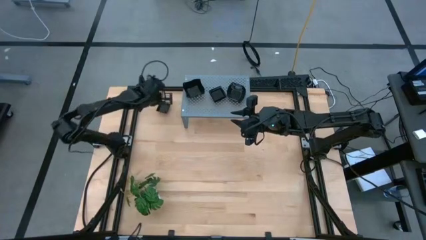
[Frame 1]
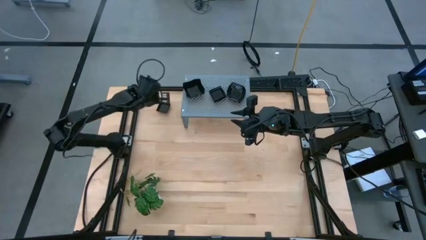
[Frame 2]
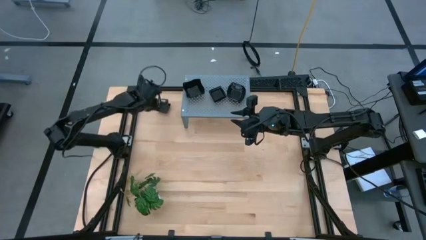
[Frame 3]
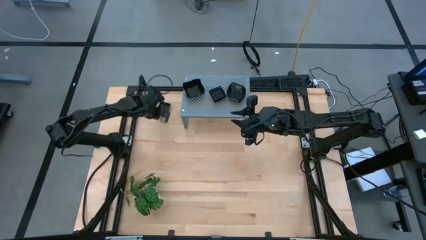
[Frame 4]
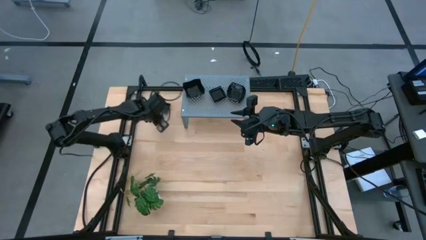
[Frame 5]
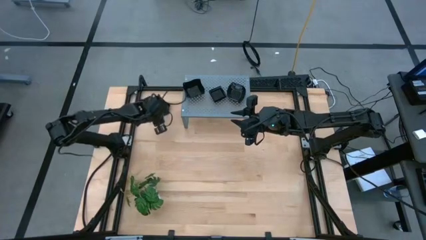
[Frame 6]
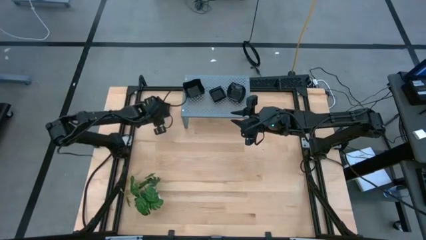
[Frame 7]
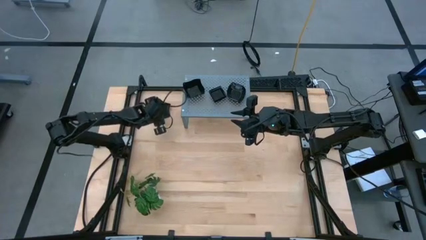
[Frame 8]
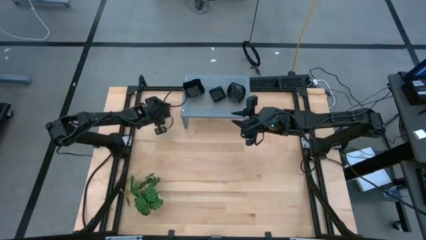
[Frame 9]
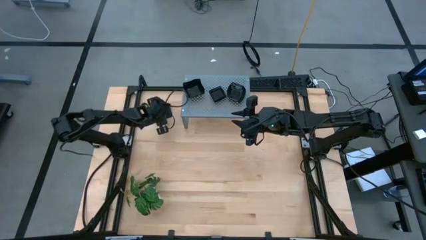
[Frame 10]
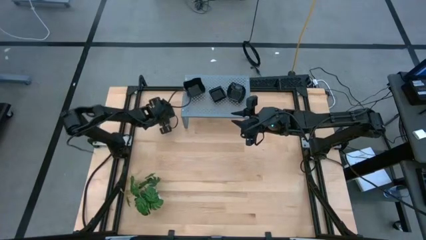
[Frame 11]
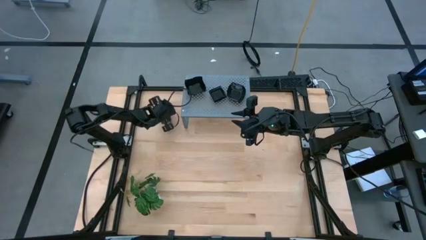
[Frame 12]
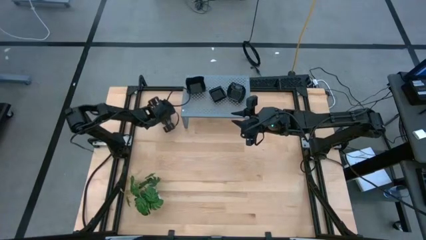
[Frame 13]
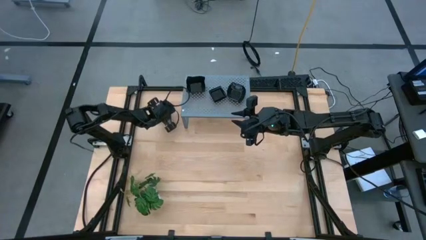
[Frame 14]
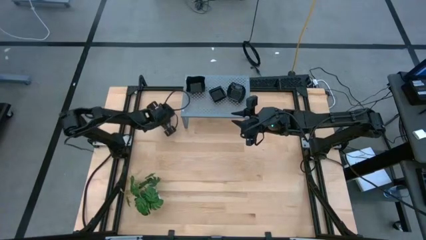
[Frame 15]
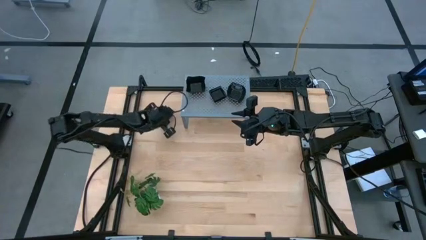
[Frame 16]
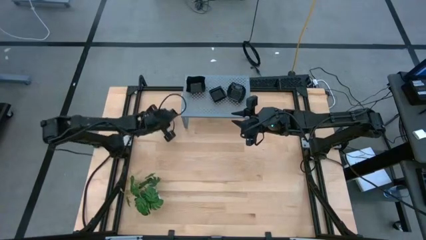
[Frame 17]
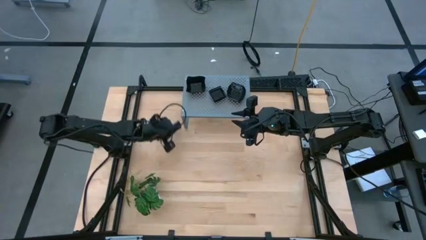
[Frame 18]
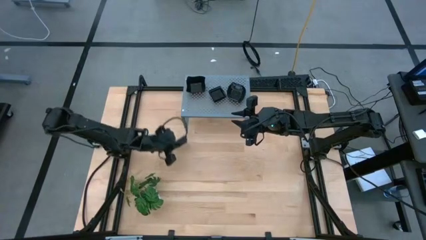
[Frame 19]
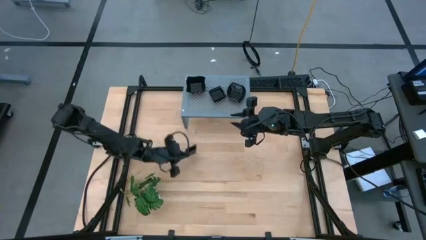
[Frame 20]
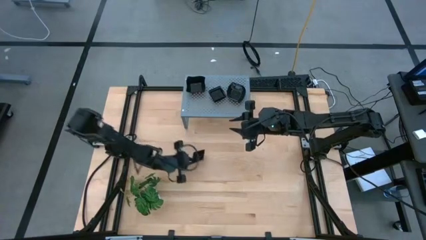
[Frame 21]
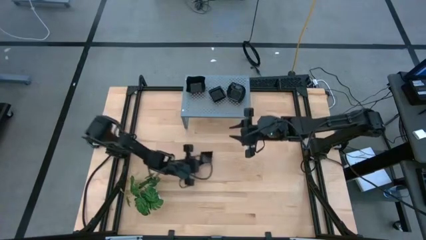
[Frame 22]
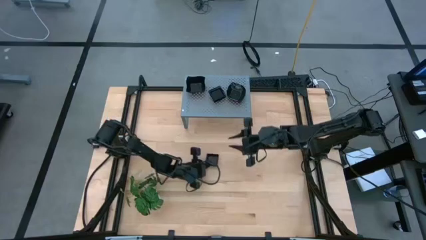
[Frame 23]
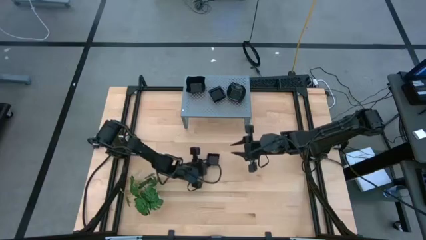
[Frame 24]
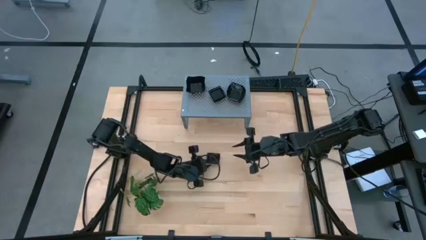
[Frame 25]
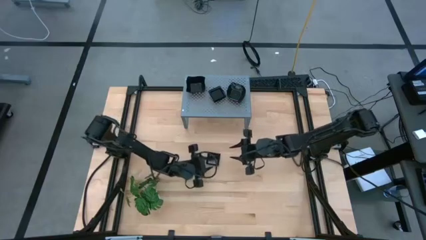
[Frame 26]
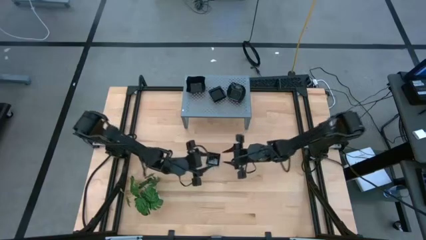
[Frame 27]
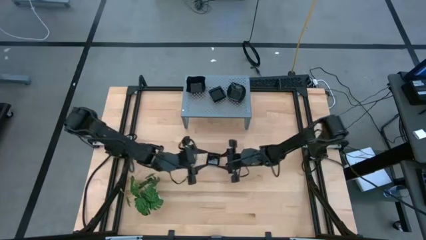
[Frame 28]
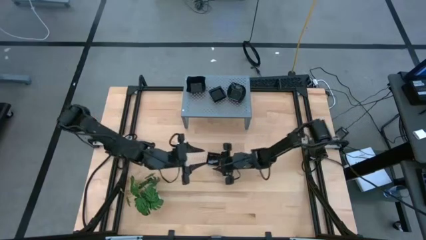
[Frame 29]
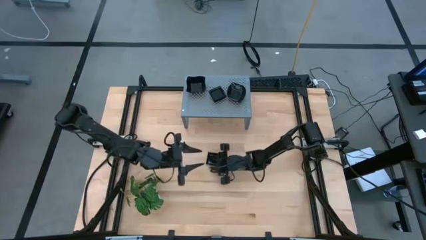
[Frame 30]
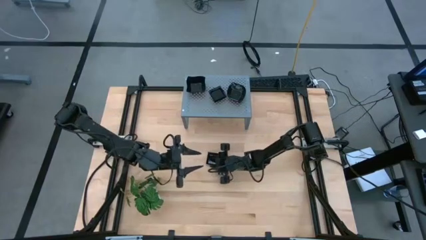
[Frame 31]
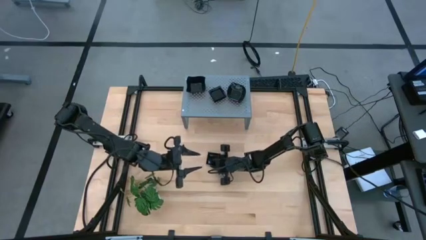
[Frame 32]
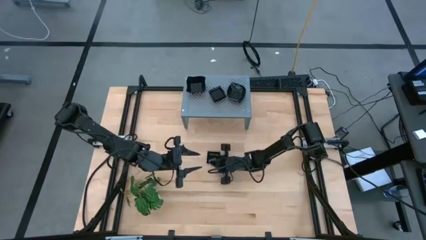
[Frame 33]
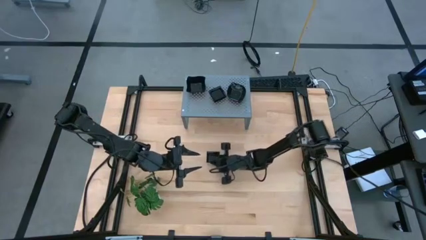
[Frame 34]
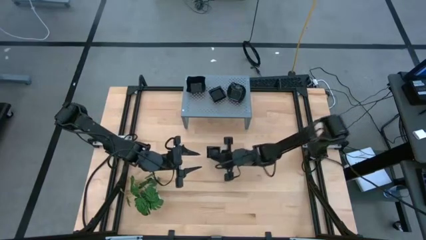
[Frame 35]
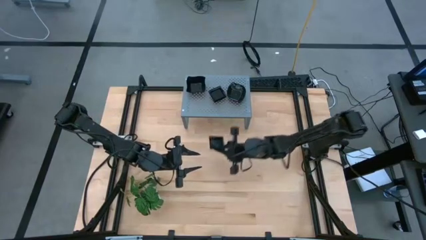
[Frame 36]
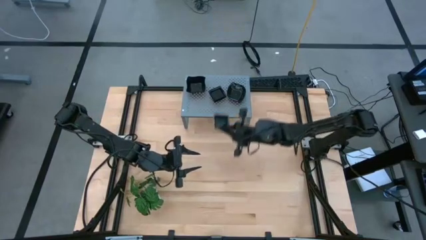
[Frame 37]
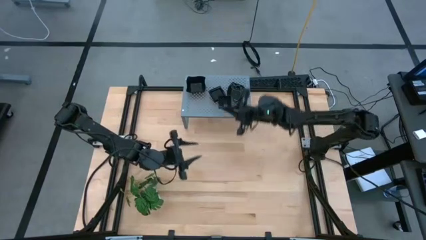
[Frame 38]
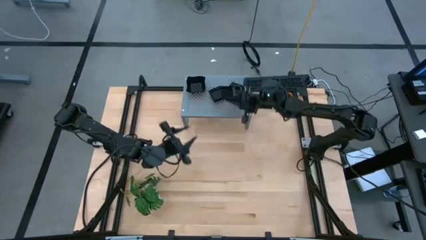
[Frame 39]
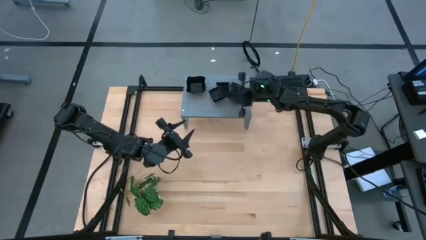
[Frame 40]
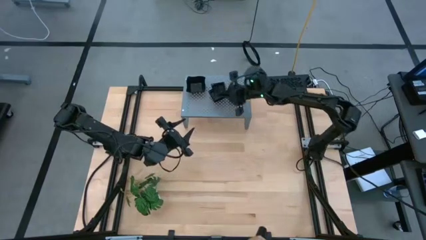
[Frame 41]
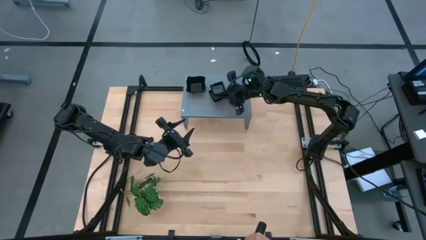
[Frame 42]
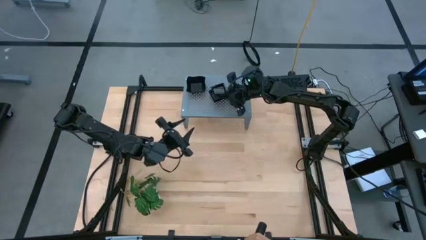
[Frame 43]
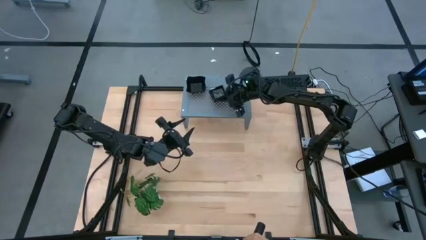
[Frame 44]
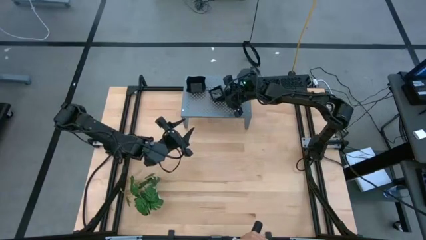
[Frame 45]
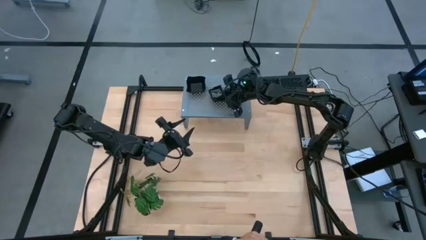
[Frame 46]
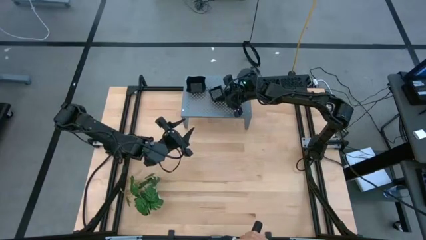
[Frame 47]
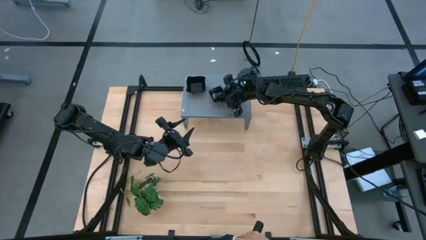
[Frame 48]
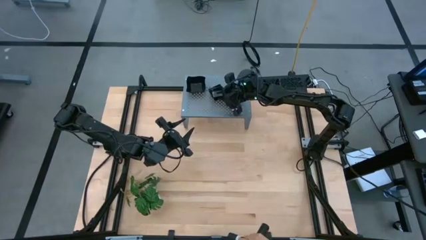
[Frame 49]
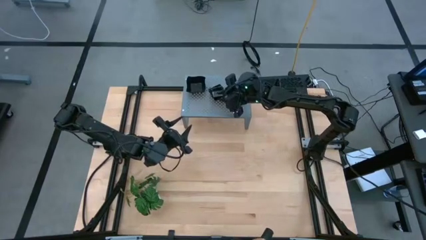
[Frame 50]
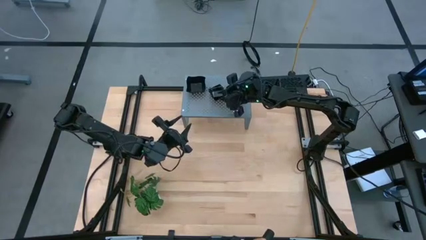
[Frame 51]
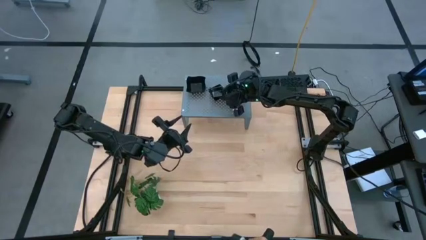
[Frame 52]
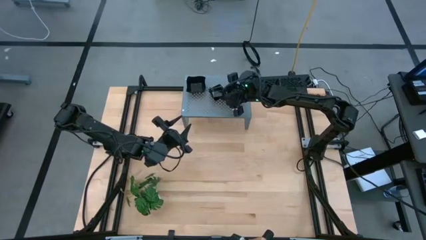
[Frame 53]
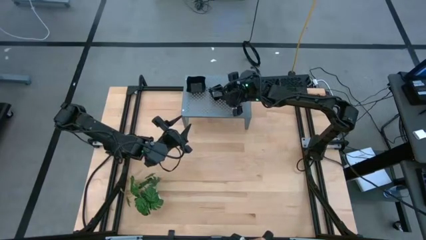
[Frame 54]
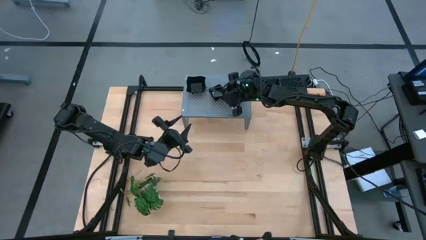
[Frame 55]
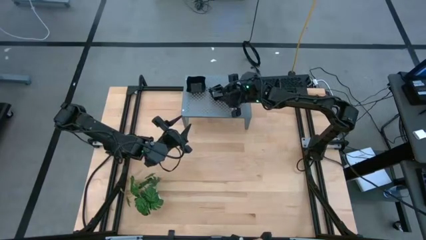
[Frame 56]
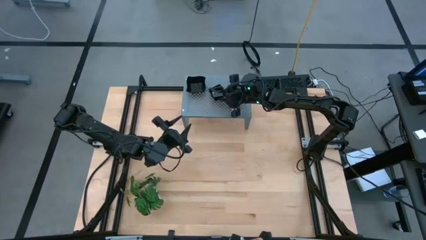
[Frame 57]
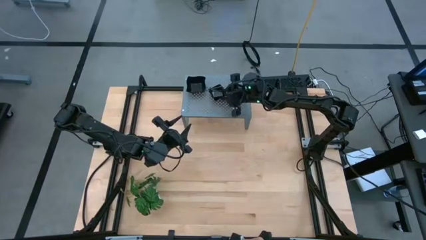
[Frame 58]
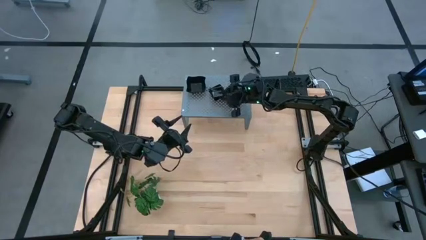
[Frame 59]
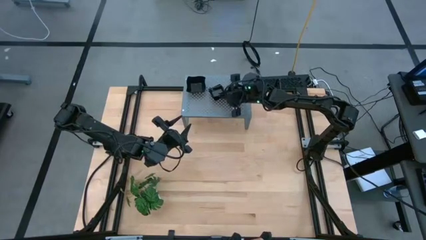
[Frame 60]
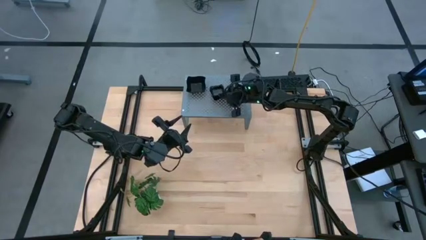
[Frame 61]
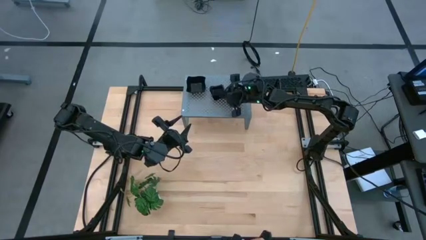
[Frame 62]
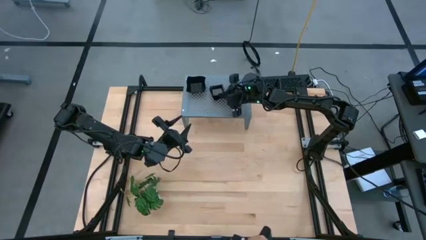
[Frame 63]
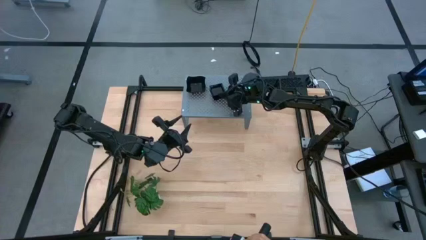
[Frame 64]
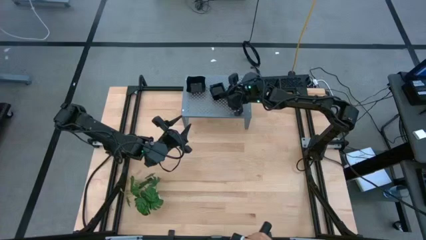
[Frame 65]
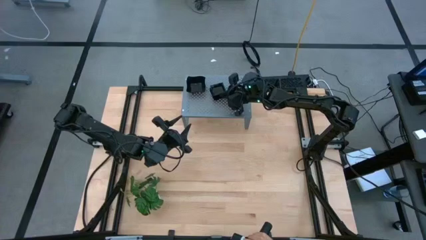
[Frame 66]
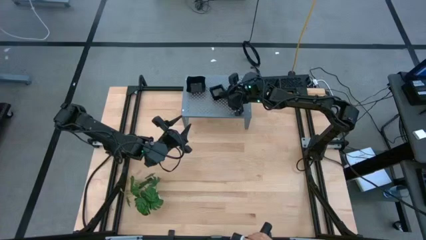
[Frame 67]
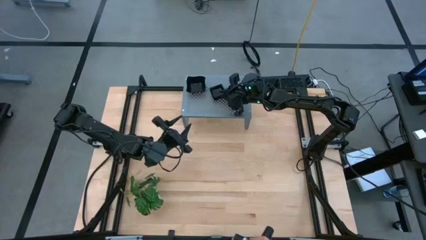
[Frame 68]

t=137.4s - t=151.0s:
Task: Pick & Place Mini shaped plates
Stack the black square plate on top of the black square plates on the shelf
